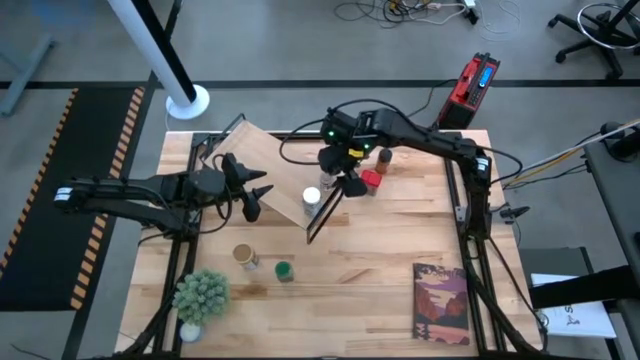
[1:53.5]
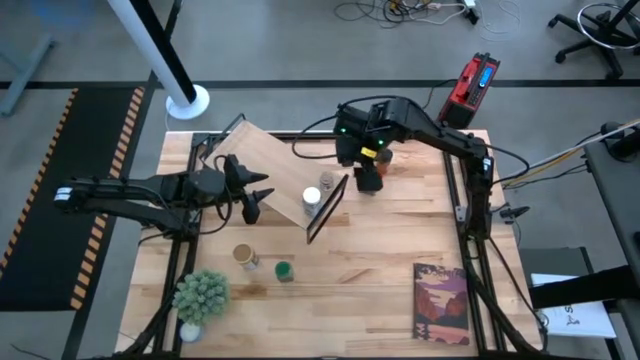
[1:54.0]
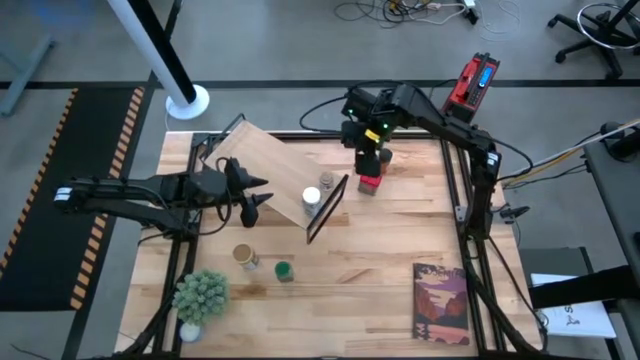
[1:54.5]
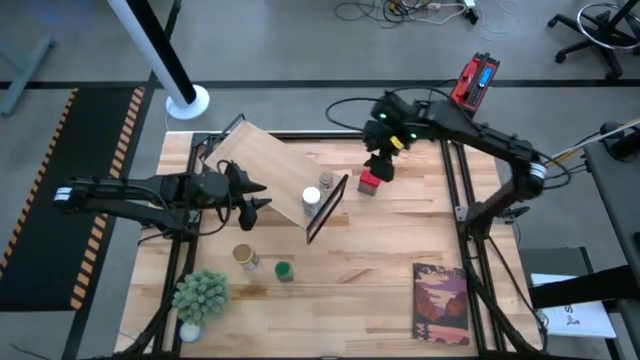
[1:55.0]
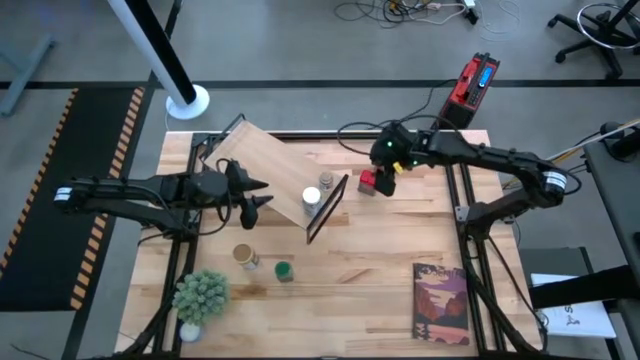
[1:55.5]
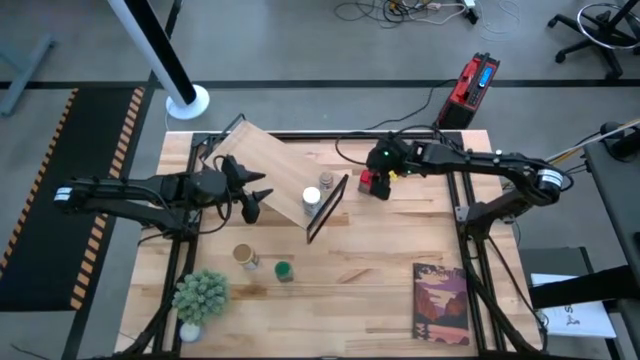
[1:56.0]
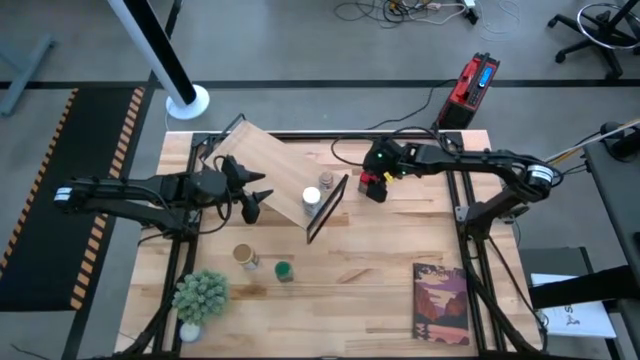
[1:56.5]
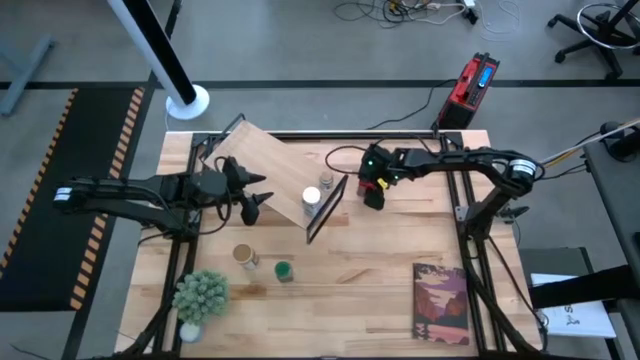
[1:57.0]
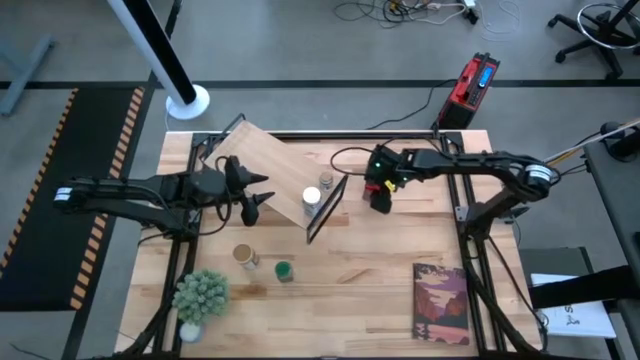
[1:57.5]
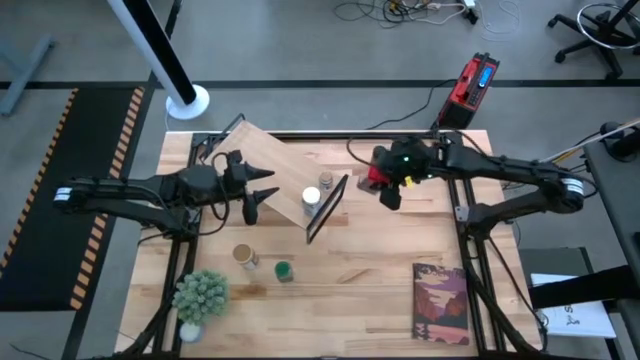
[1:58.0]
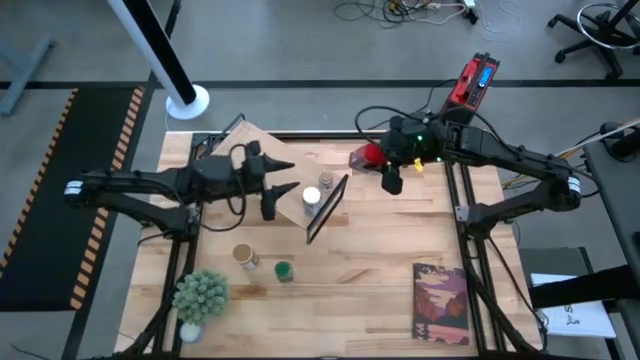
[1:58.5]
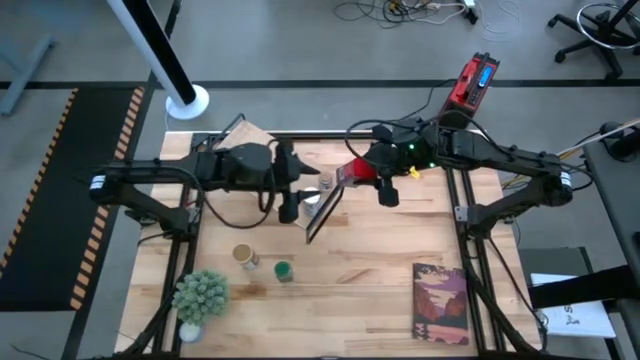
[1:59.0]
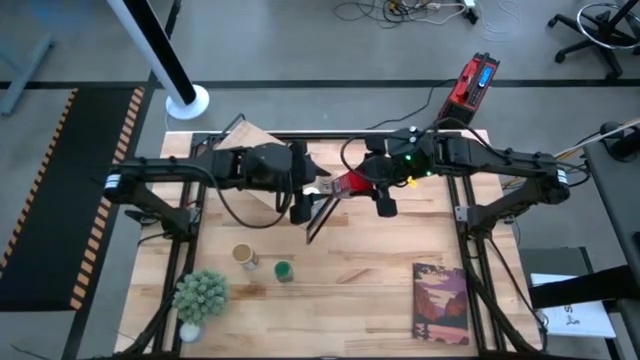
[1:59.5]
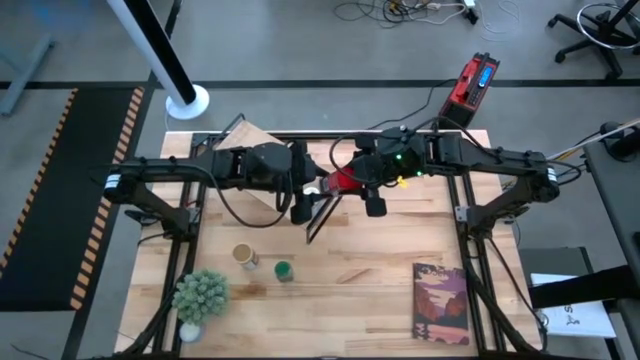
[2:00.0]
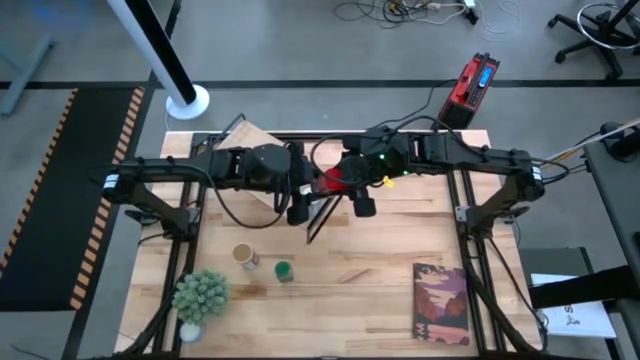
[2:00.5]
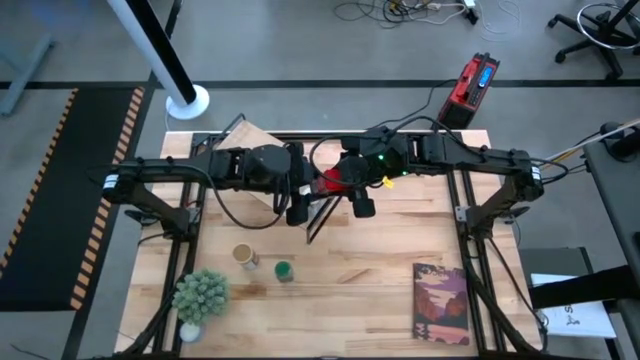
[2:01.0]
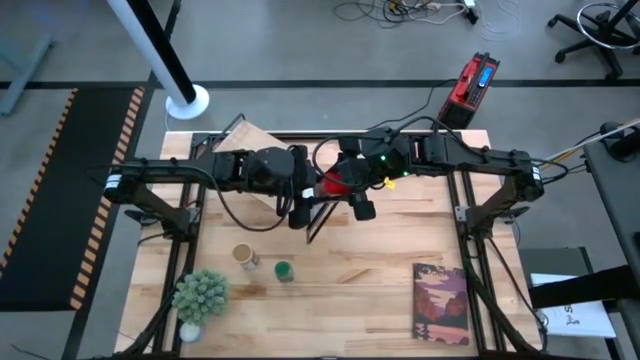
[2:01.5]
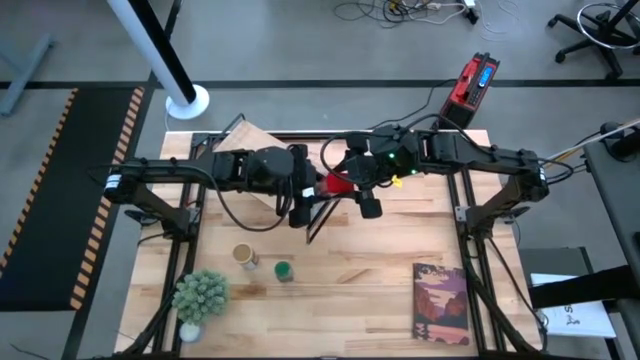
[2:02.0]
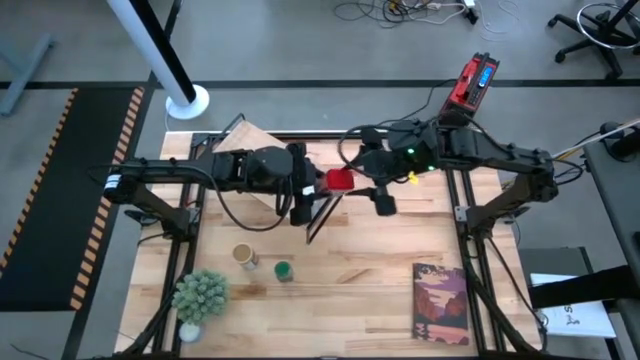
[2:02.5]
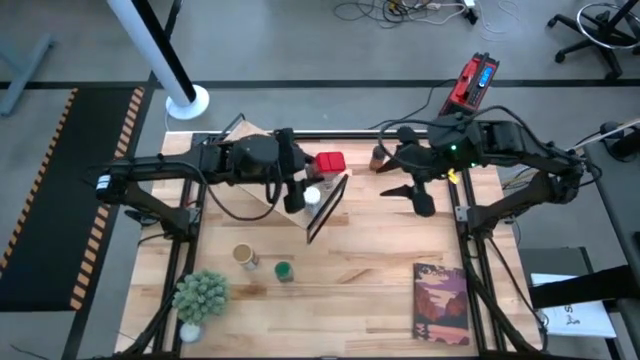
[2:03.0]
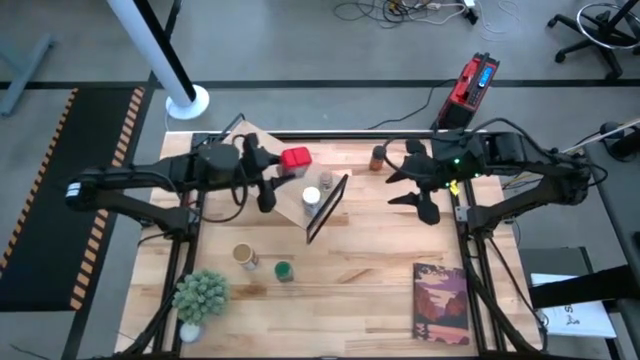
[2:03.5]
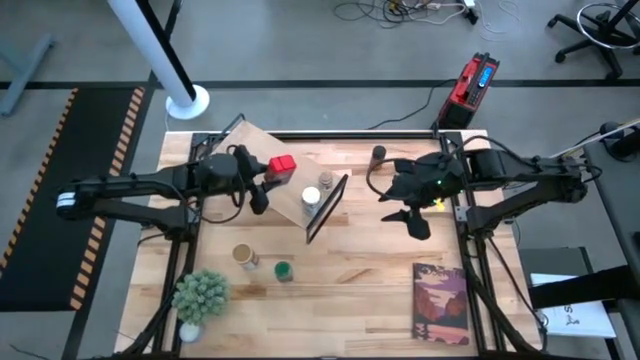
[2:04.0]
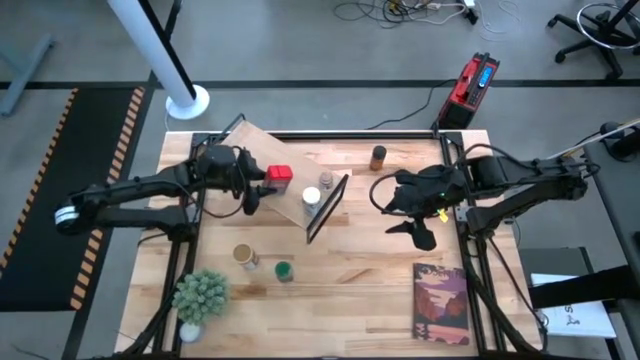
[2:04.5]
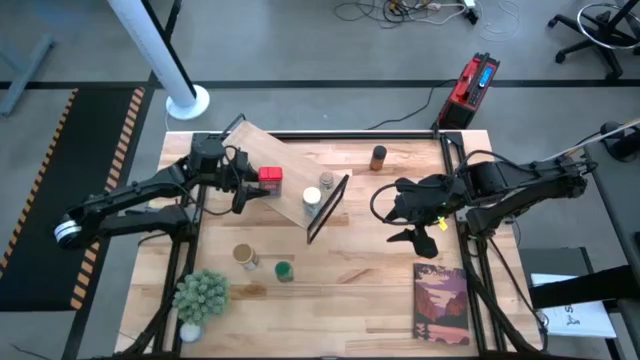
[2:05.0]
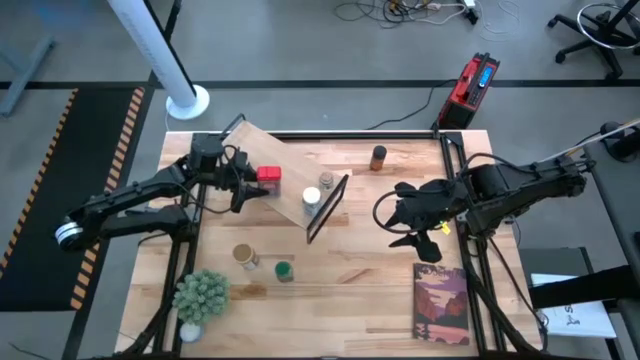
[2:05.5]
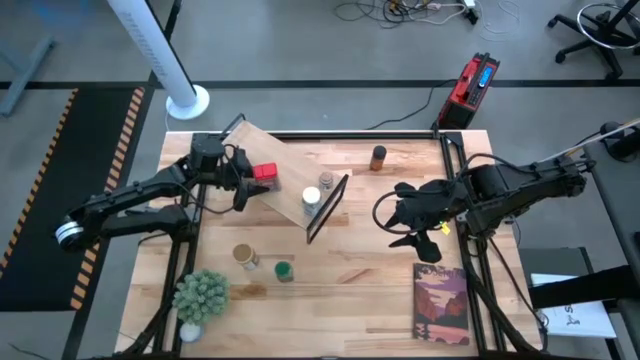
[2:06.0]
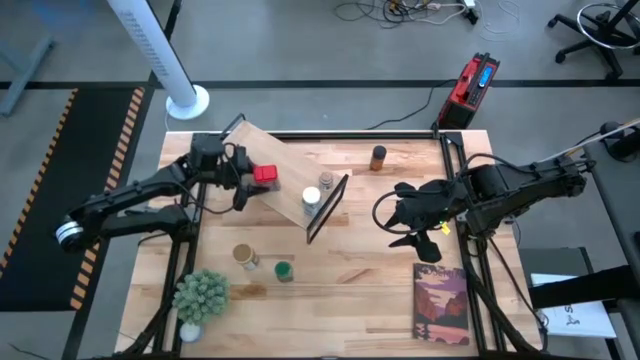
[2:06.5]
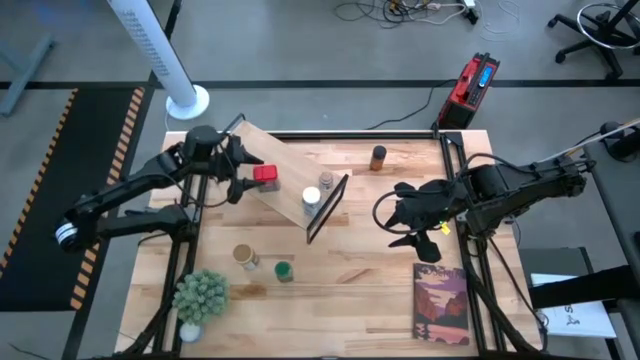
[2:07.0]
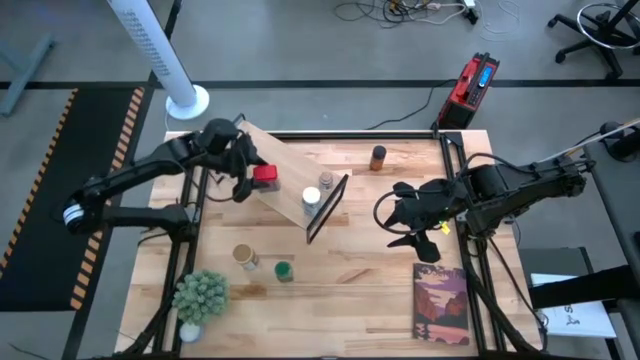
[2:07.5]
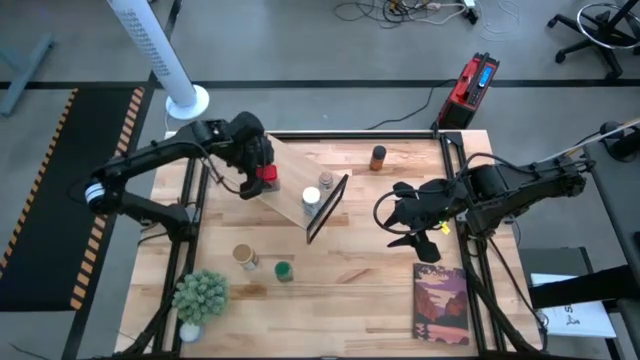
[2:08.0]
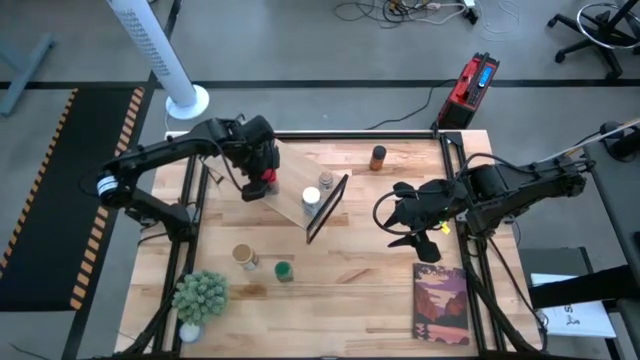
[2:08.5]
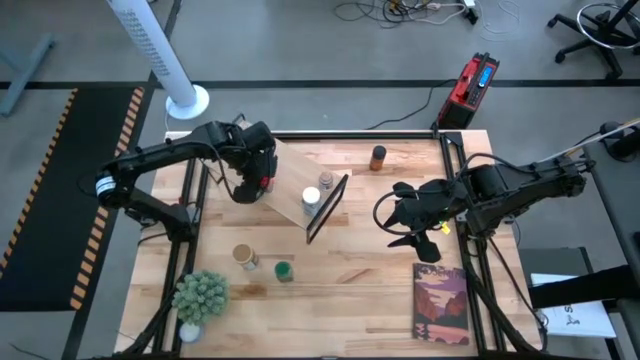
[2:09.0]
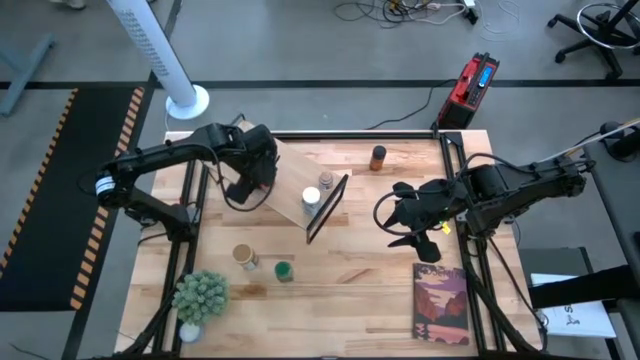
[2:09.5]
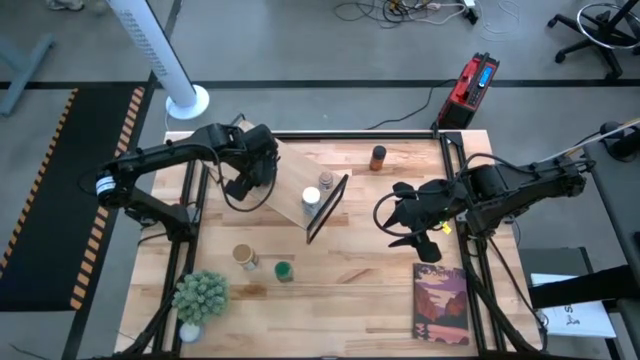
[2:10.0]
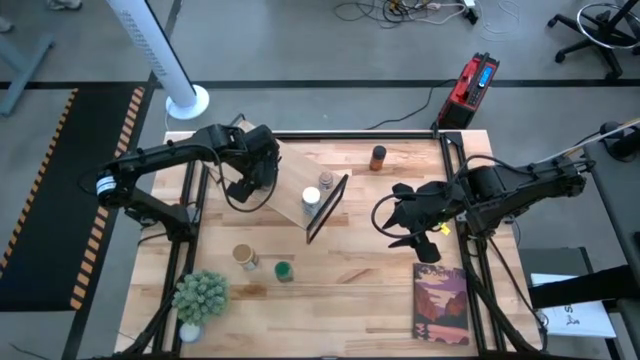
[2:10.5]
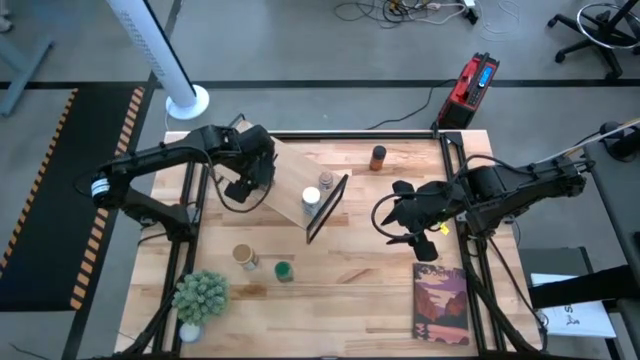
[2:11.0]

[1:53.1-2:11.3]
Task: Shelf spices
Put the red seasoning can on the shelf

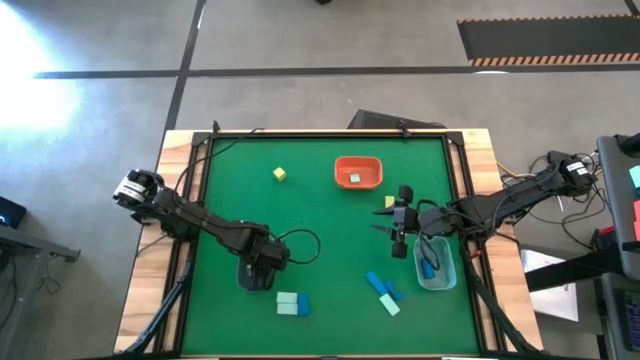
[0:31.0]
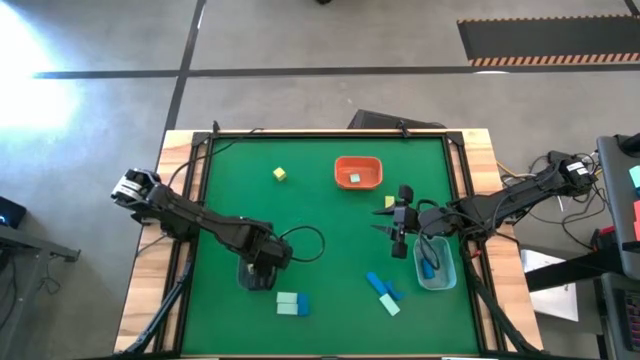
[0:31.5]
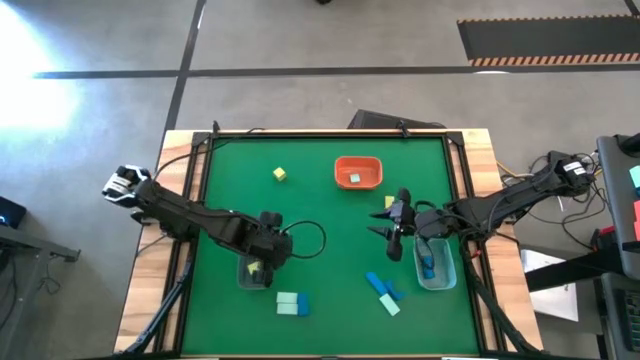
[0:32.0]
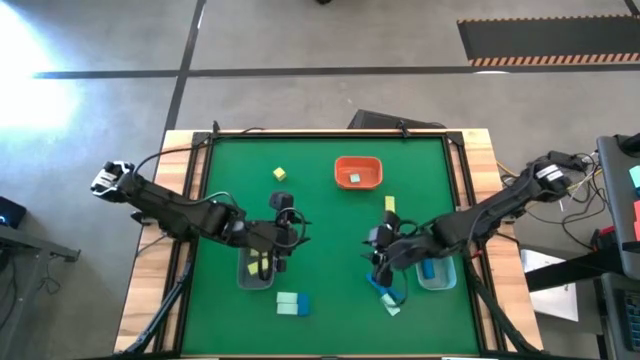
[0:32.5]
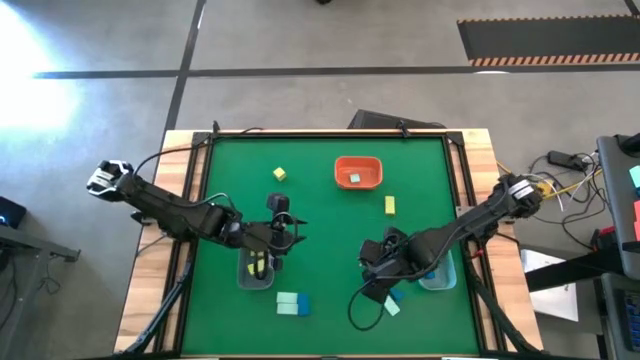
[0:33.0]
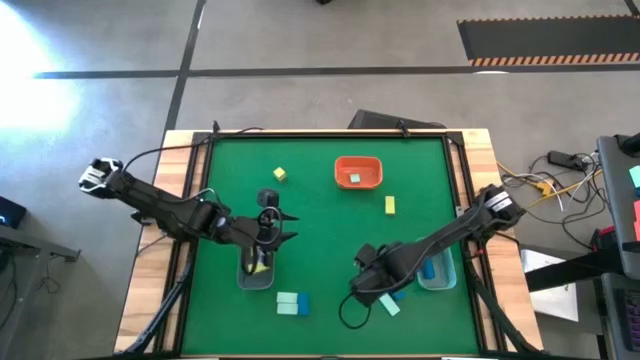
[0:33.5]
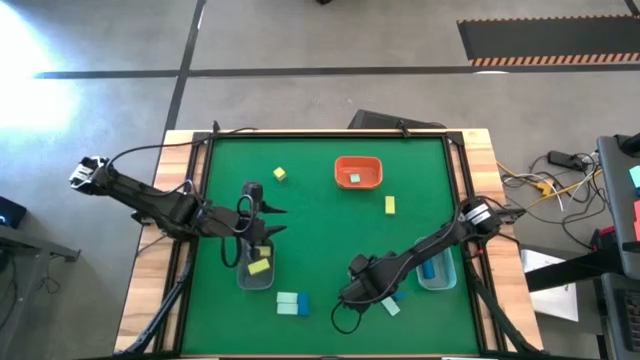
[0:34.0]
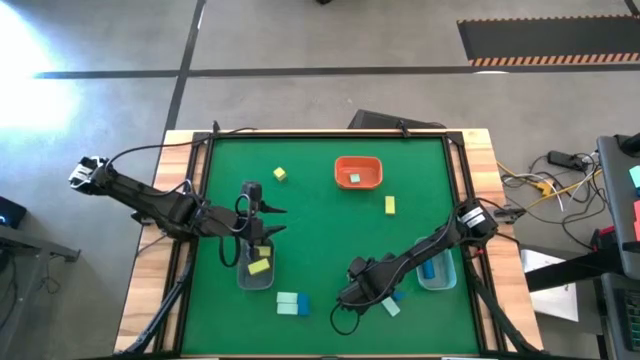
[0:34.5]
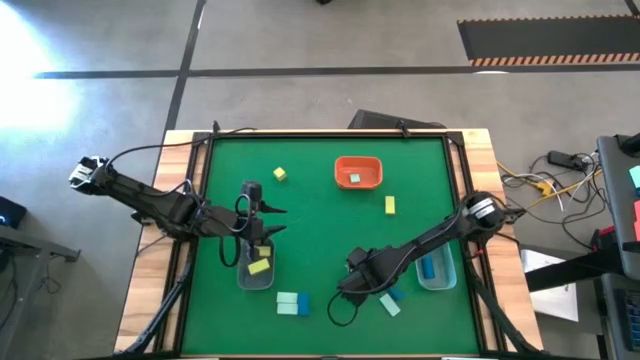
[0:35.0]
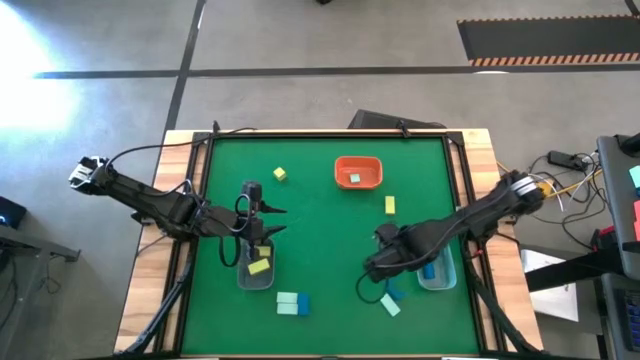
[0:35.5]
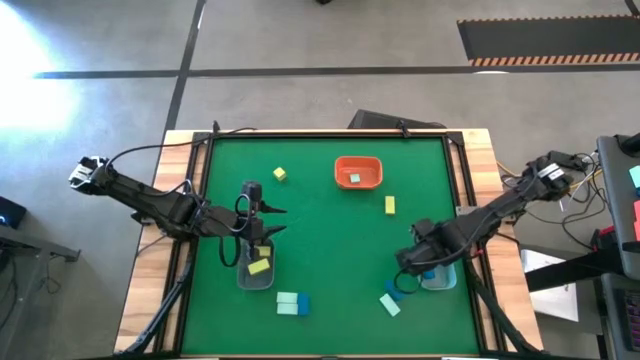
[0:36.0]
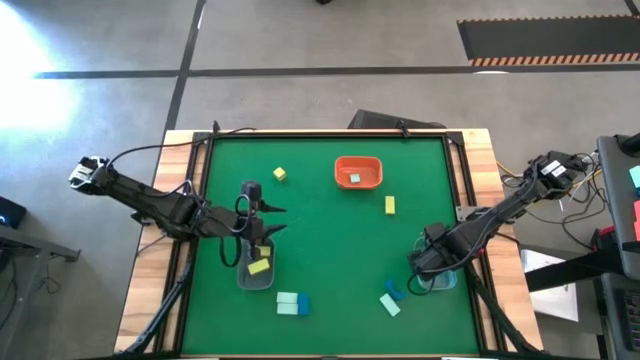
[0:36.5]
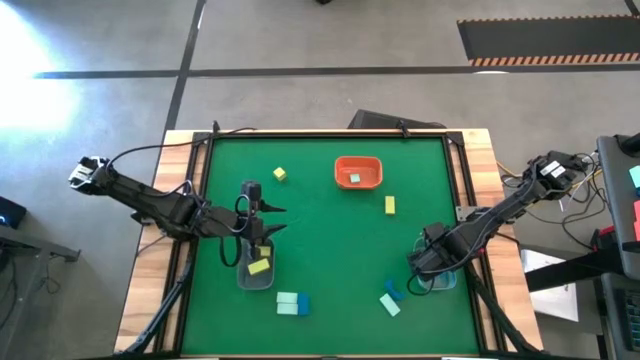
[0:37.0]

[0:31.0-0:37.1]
Task: Sort & place blocks by color
Put the blue block into the light blue bin
